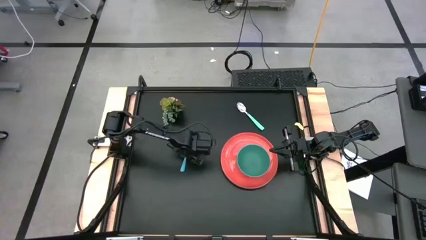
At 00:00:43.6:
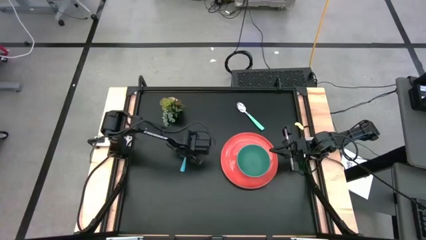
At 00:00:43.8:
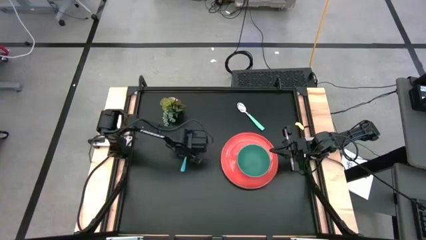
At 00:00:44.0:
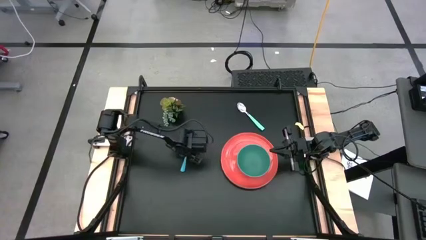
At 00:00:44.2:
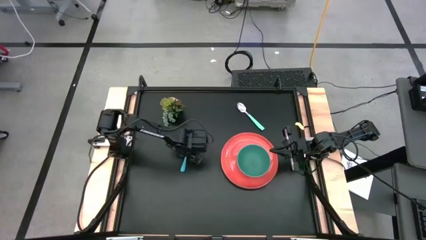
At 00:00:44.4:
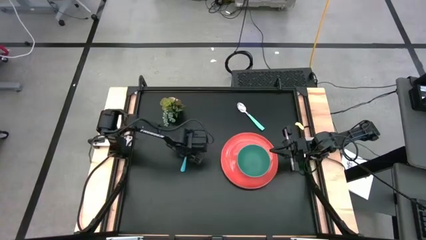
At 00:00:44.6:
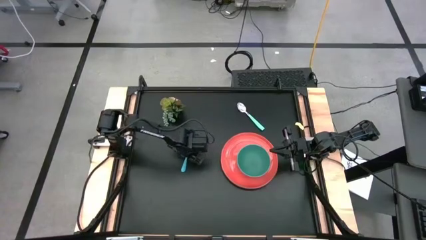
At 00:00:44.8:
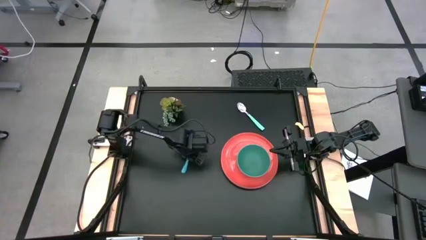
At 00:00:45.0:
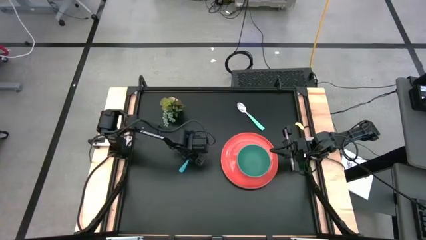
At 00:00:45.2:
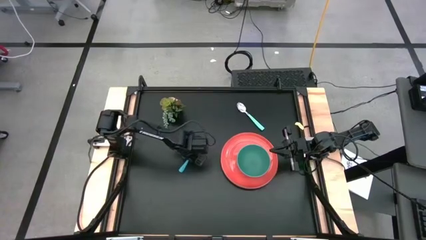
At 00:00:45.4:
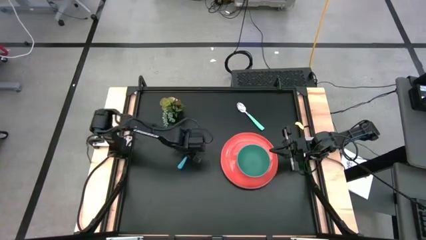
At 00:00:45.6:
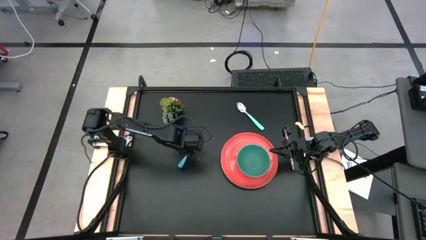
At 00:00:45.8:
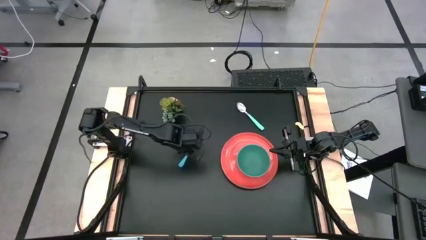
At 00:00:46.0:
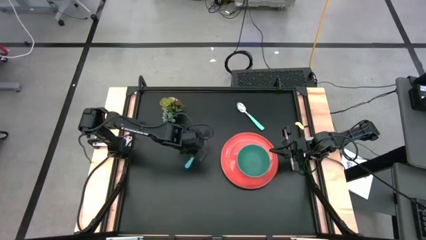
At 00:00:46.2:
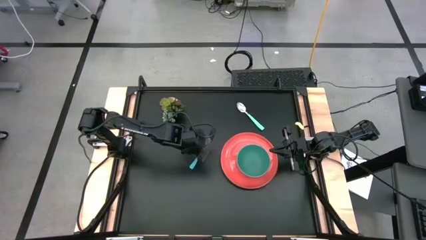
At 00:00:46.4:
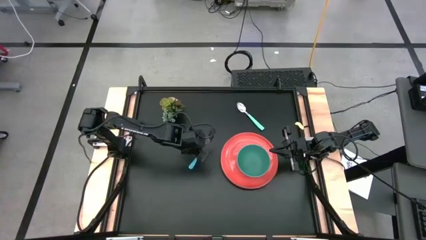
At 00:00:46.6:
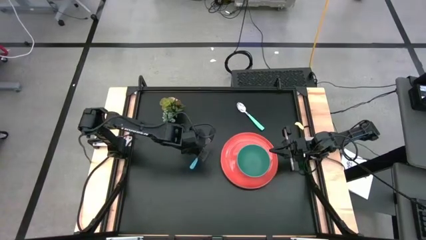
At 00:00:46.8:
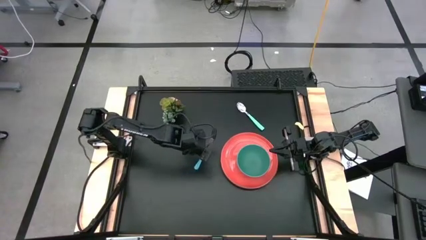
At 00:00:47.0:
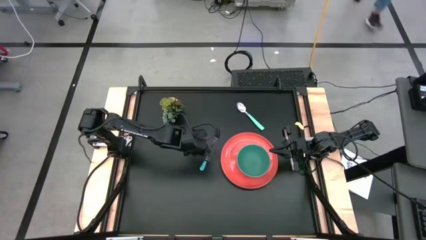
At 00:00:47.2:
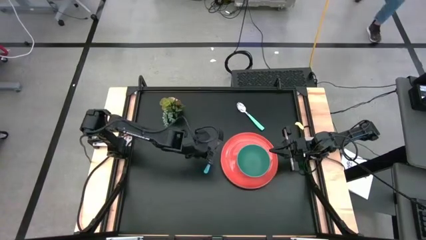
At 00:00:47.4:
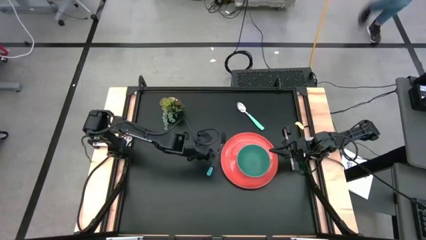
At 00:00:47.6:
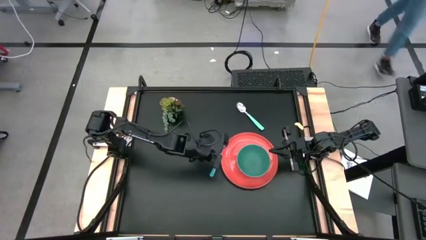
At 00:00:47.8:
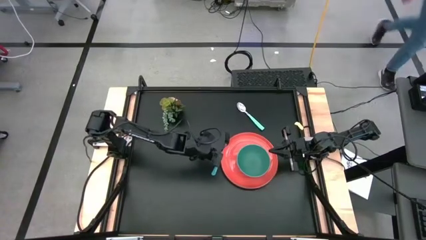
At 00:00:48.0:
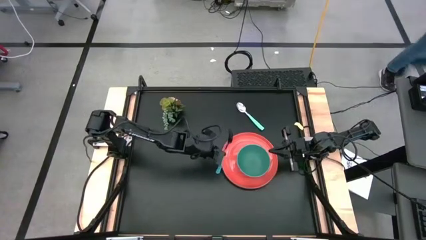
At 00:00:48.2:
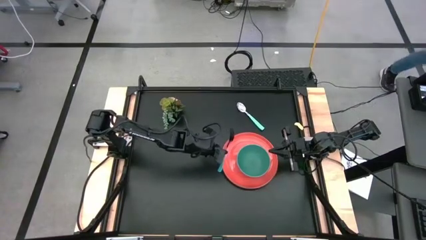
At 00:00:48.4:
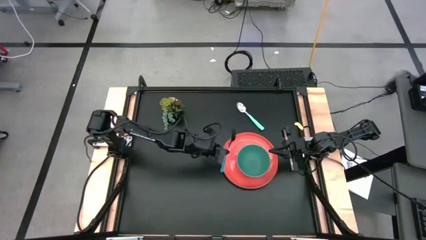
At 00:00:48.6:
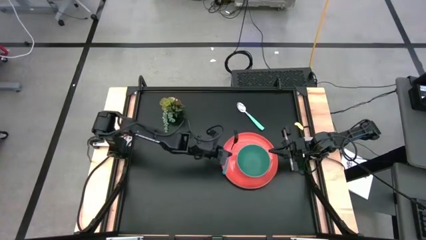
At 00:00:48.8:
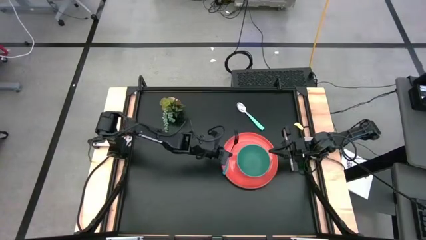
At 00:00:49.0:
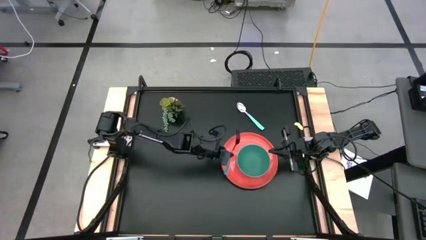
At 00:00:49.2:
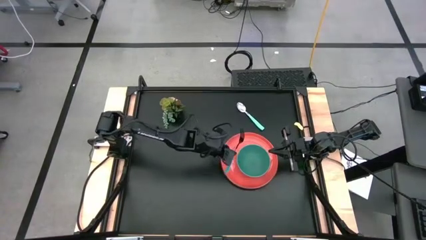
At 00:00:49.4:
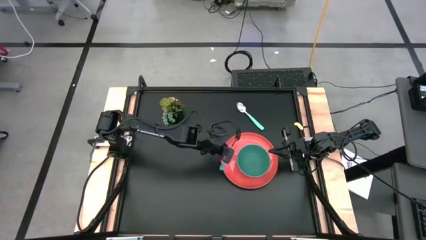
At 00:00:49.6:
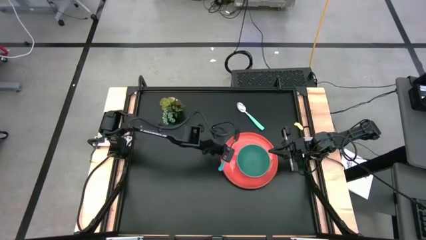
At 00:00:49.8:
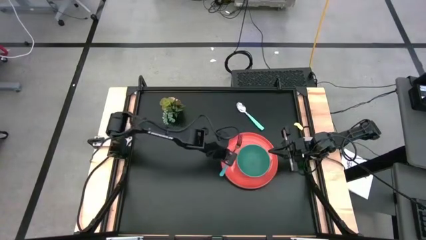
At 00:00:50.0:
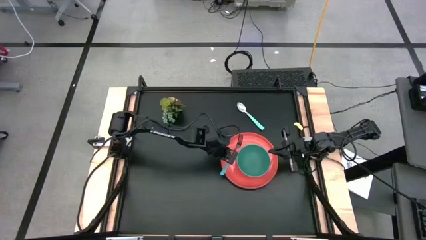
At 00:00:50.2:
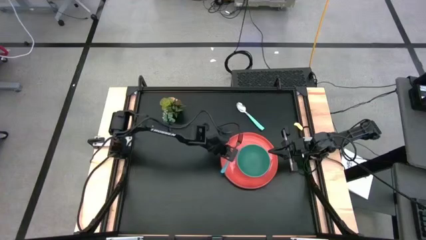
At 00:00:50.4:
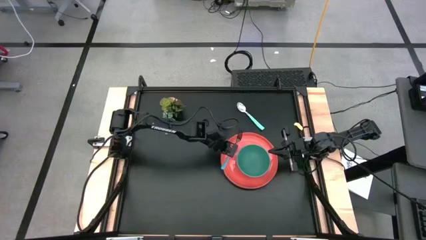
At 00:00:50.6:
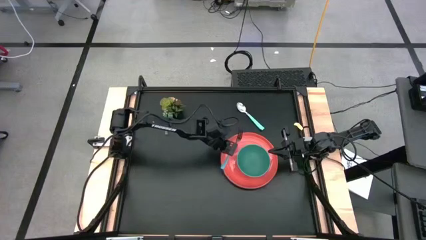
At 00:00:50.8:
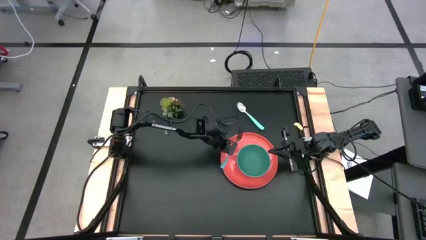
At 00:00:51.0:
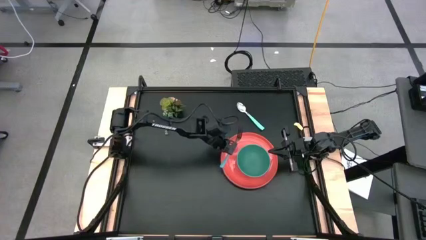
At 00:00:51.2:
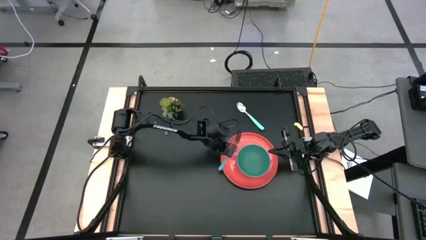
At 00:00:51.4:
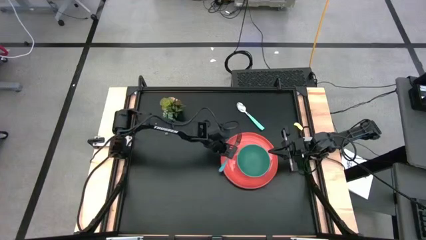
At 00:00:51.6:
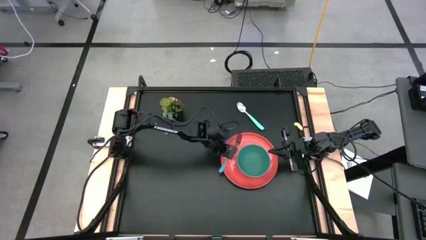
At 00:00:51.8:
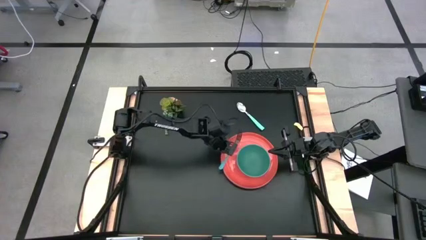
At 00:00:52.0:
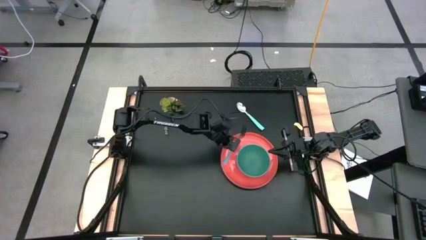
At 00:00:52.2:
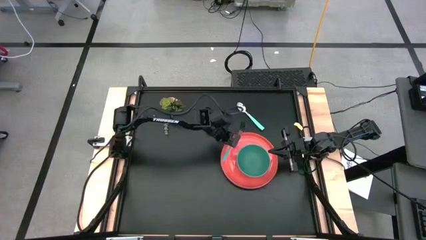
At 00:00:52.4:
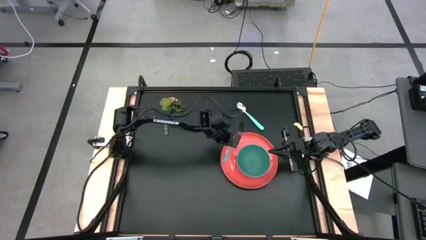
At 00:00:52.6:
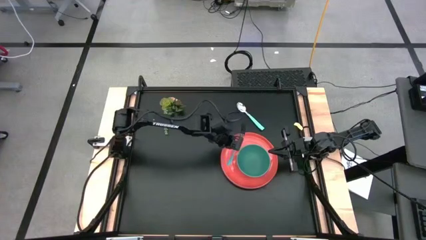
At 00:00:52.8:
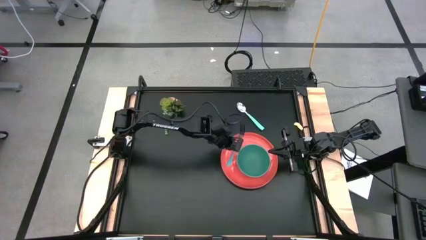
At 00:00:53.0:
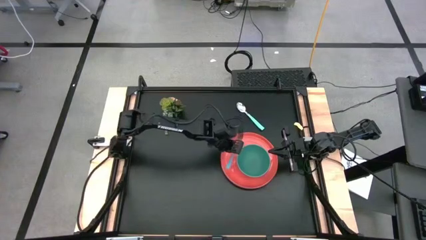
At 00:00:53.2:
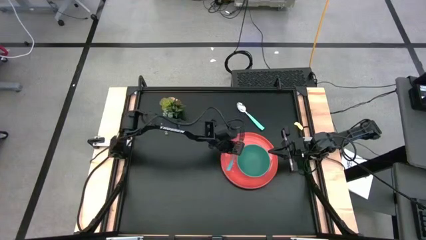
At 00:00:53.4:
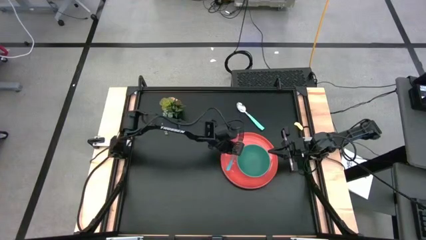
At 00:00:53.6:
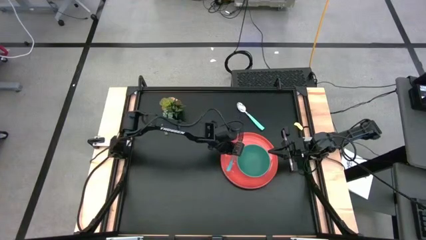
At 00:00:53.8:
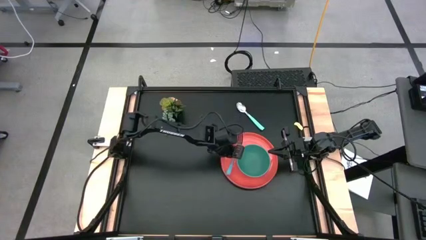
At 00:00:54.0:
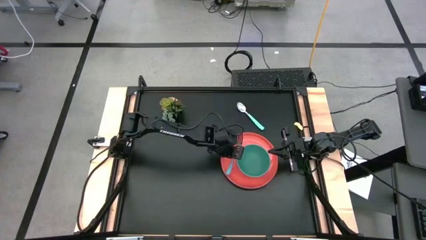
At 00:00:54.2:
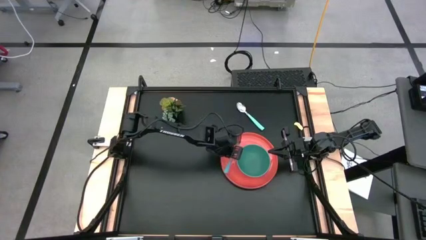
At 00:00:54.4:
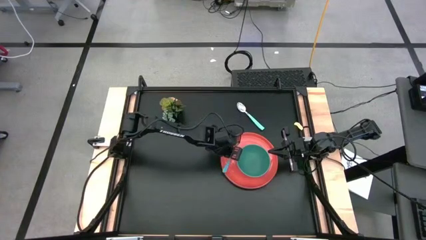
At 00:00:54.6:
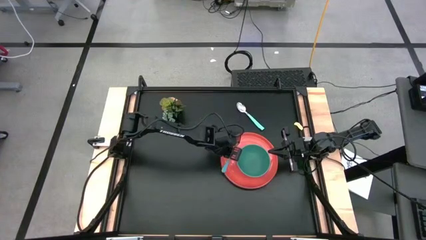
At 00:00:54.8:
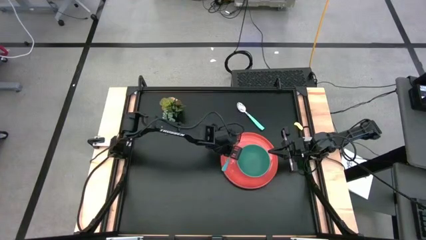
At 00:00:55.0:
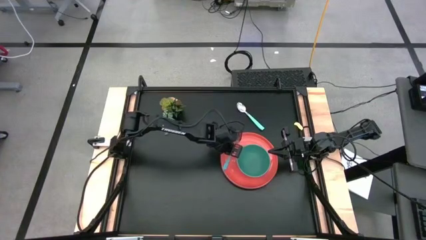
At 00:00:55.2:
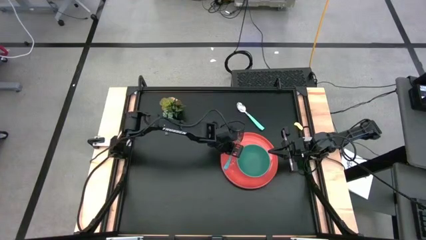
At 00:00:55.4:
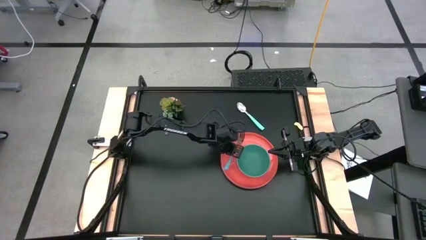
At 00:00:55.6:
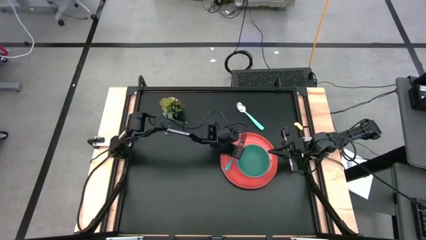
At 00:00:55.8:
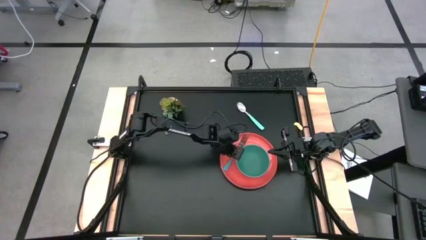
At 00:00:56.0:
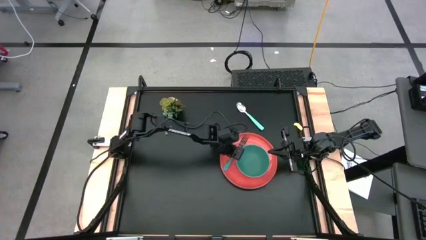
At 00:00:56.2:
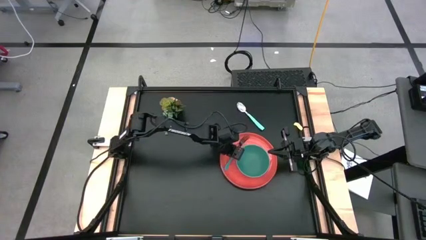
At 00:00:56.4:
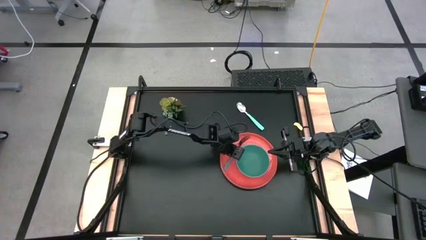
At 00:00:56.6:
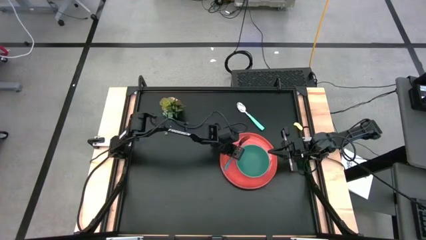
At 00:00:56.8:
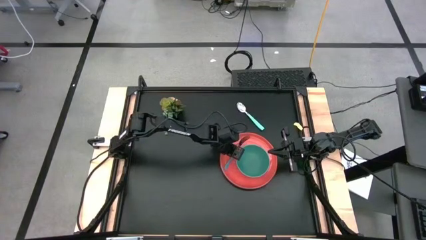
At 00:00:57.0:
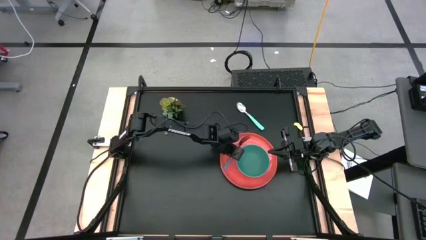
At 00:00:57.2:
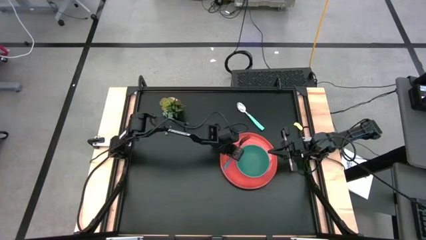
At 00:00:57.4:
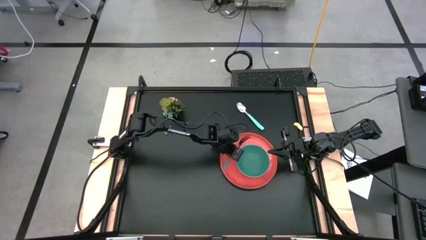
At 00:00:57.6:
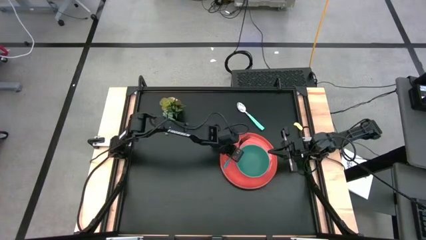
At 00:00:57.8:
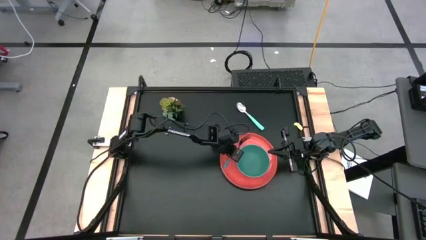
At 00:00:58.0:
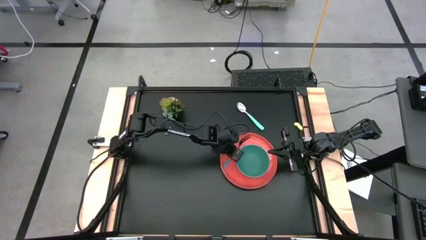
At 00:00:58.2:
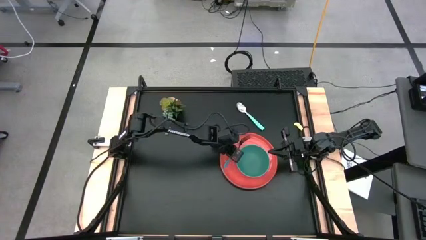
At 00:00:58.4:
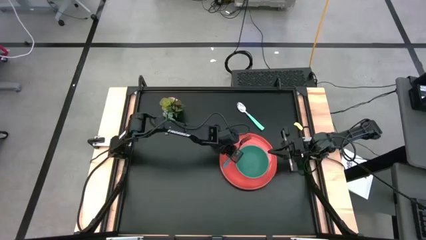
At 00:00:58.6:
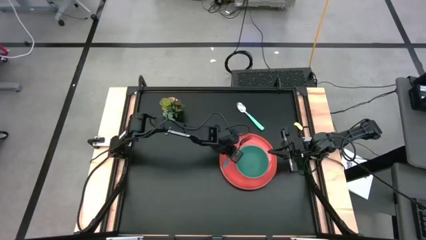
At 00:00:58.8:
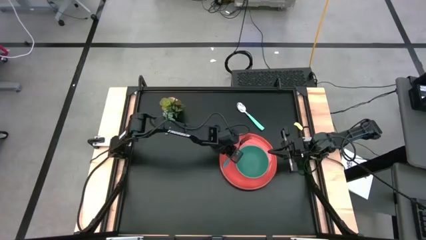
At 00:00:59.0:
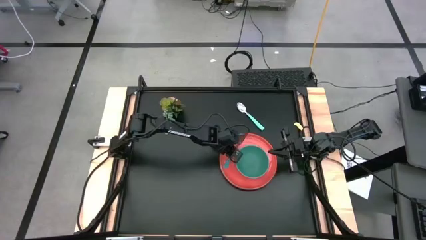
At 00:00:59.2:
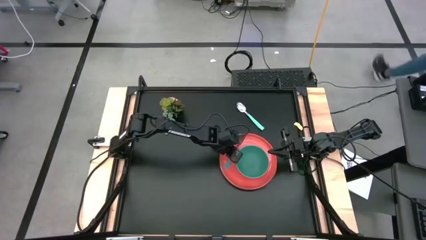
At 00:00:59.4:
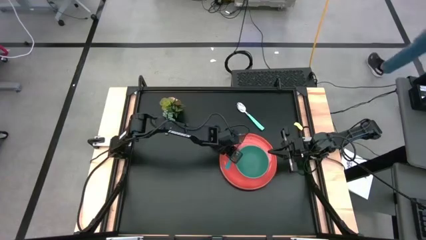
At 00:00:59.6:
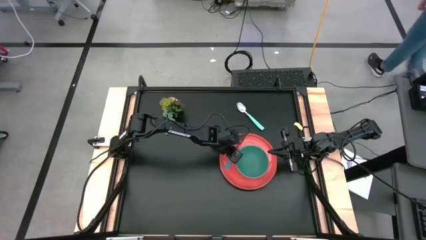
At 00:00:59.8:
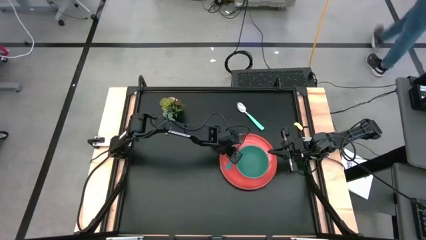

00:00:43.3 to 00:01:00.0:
Task: Set table place
Put the blue fork on the orange plate to the left of the green bowl
